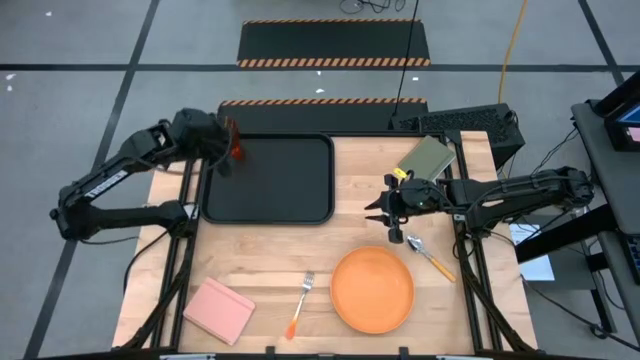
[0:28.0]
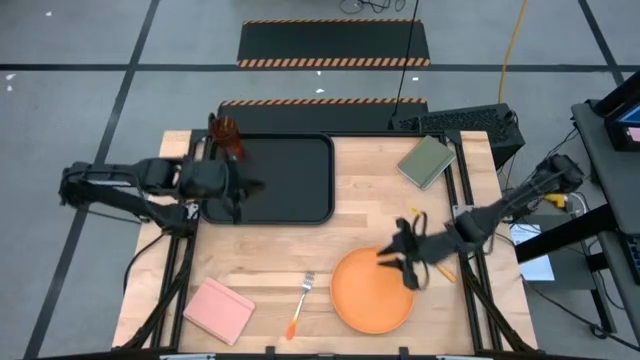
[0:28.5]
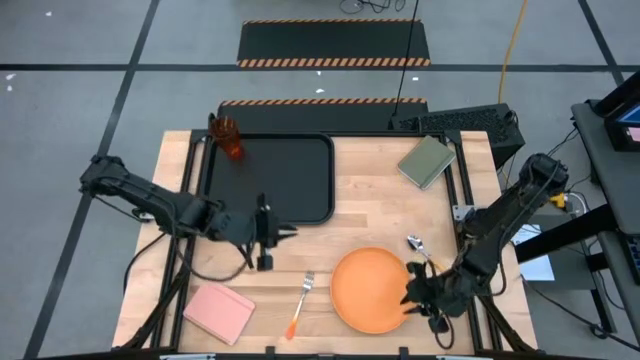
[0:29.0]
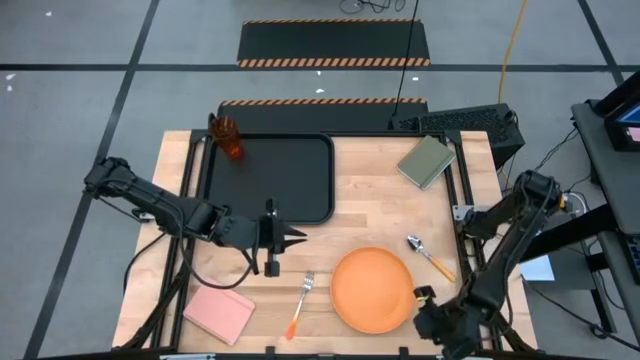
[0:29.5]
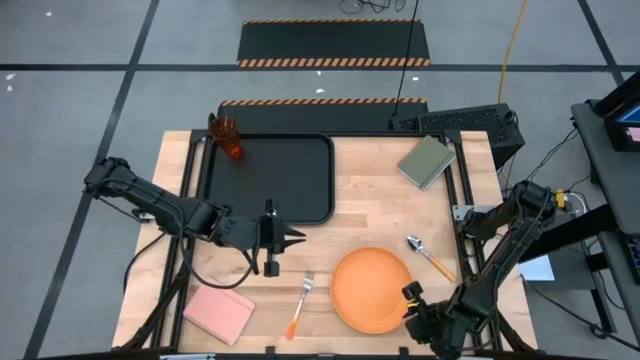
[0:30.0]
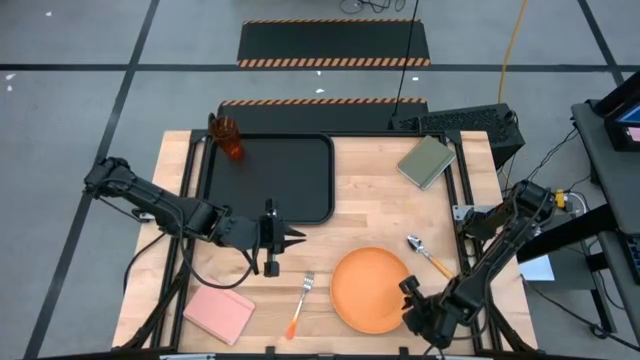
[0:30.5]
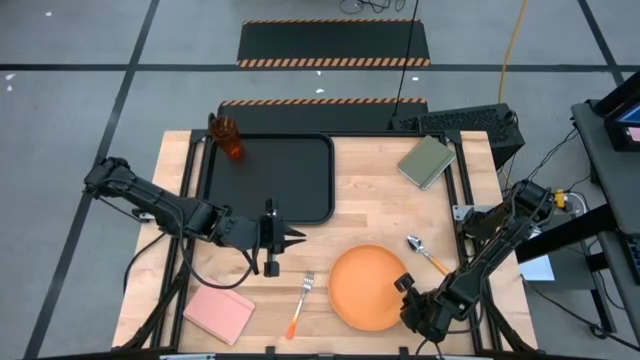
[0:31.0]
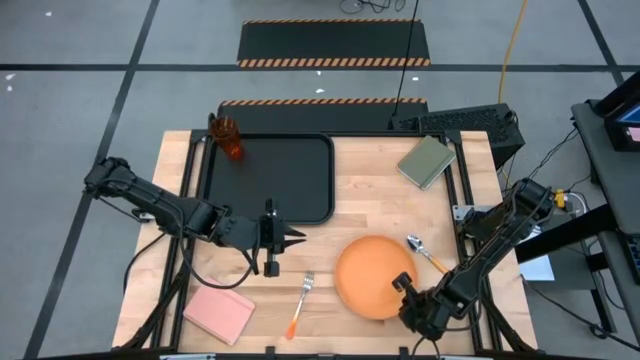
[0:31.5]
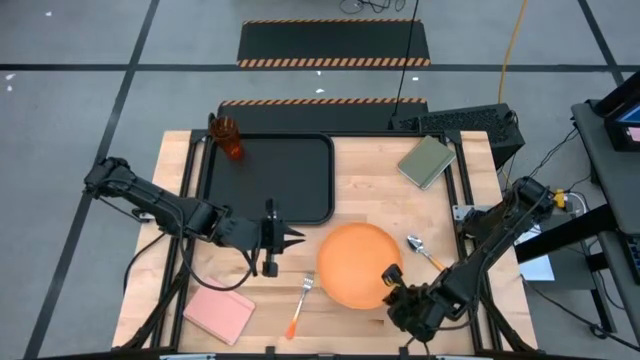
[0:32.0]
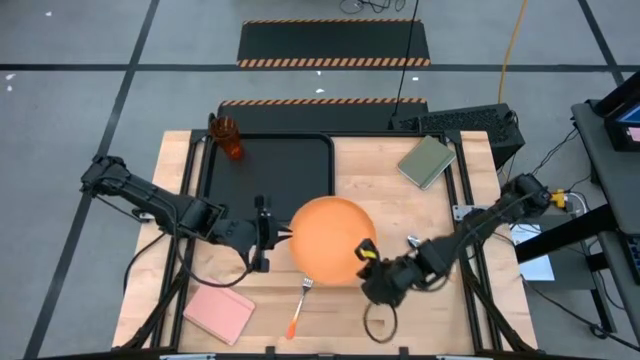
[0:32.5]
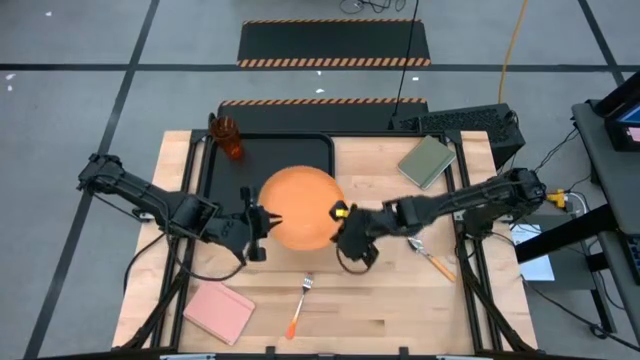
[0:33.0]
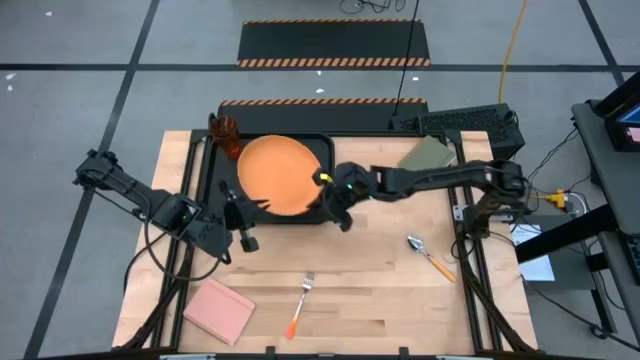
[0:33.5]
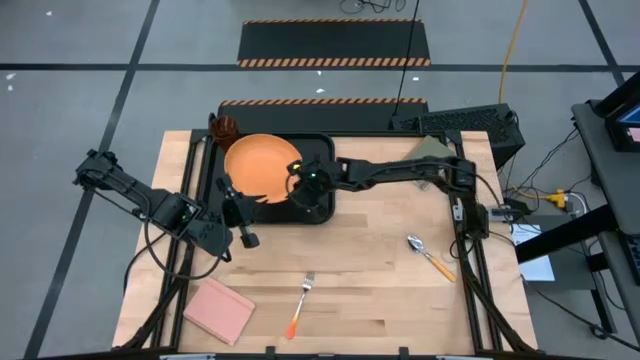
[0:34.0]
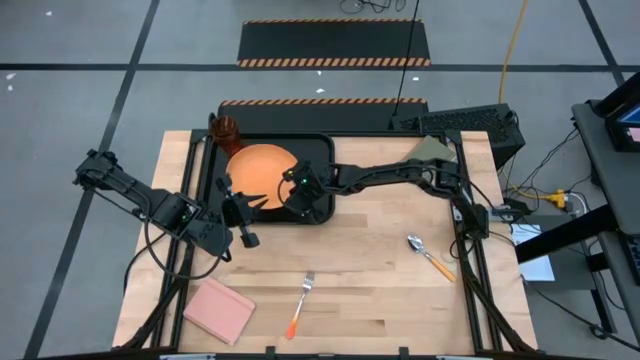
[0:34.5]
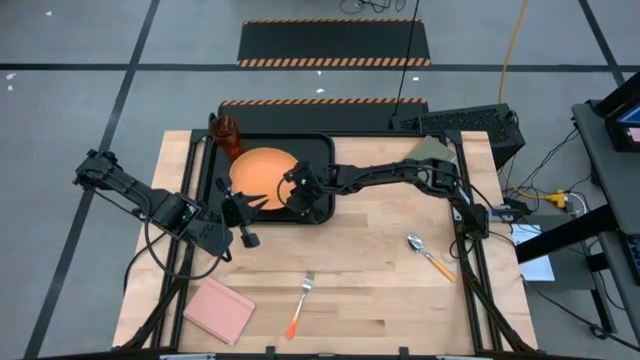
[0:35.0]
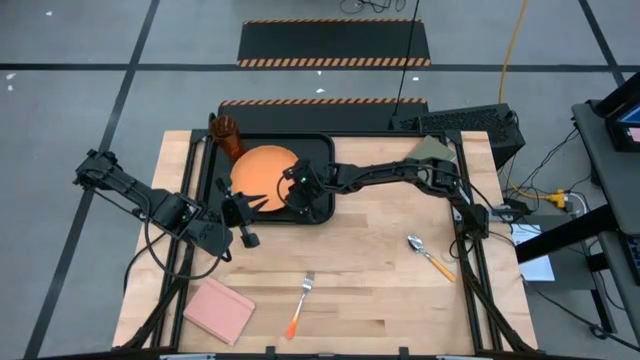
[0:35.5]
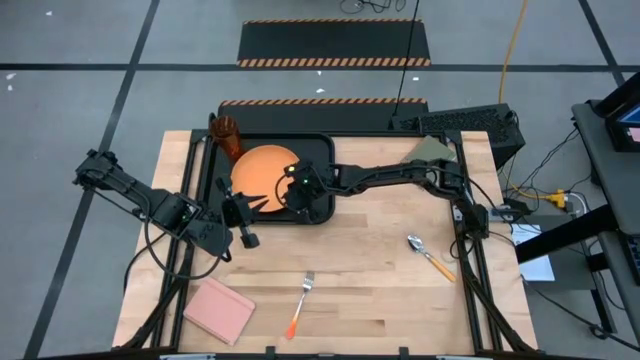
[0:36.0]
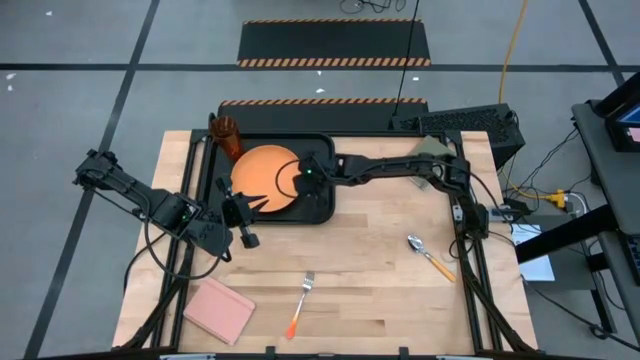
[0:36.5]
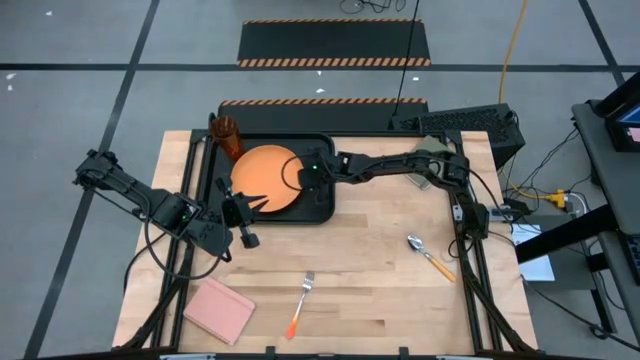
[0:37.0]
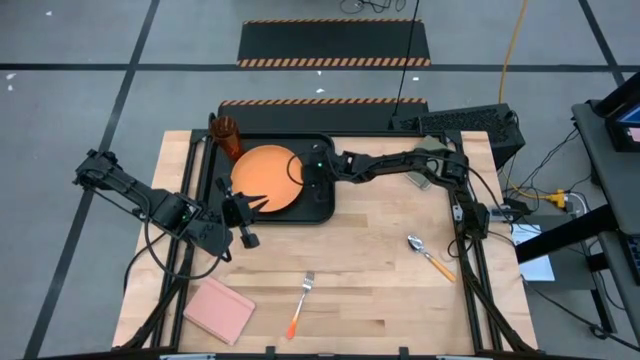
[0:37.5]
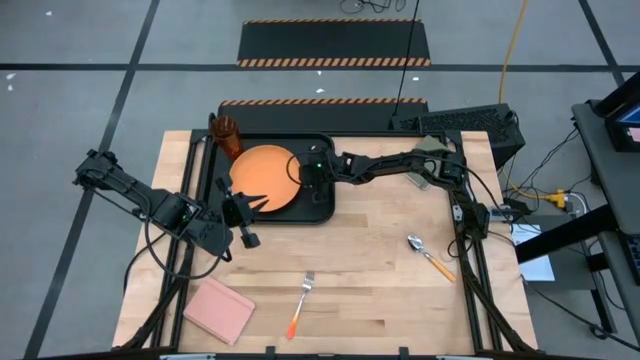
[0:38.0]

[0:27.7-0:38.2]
Task: Pick and place plate/cup/fork/spoon on tray
Put the orange plate on the black tray

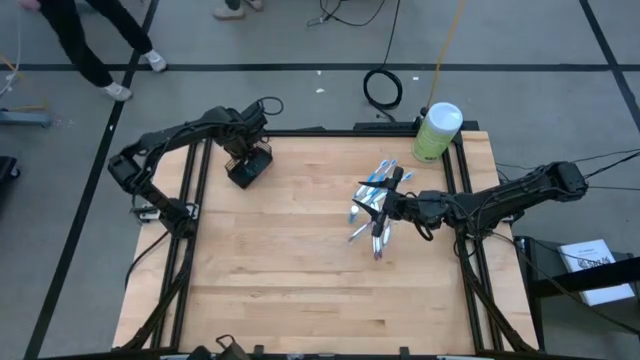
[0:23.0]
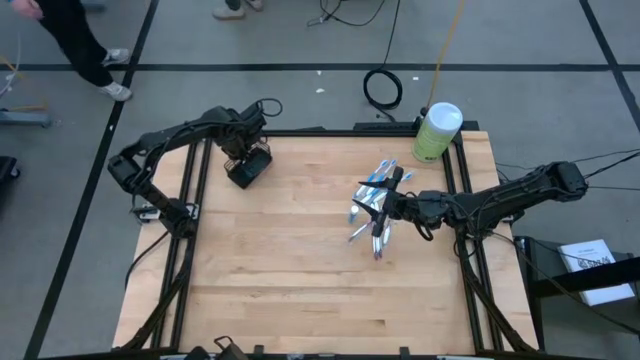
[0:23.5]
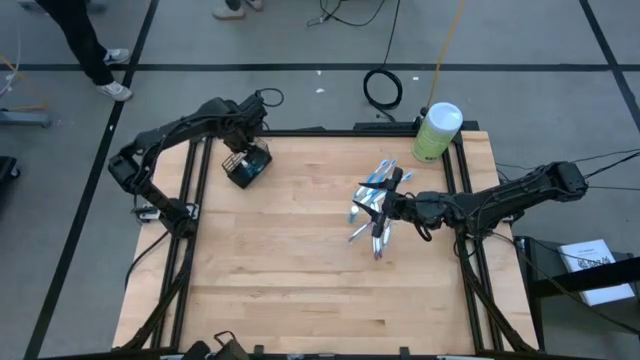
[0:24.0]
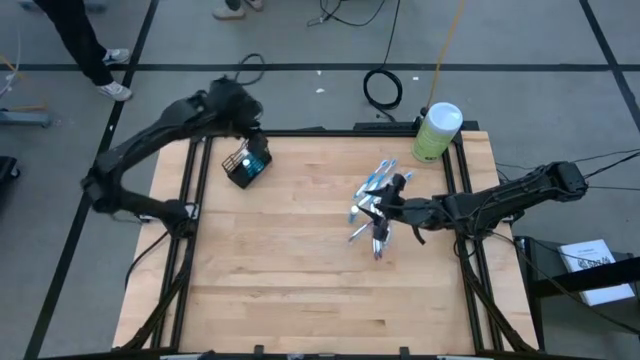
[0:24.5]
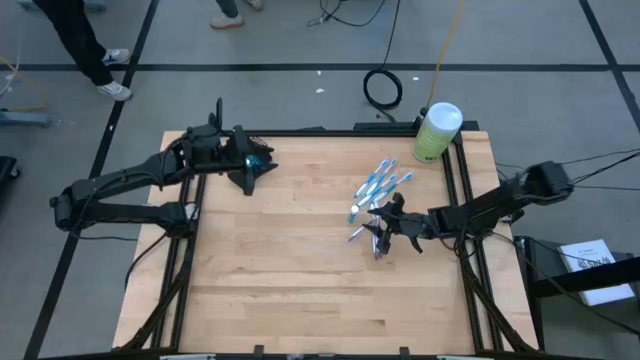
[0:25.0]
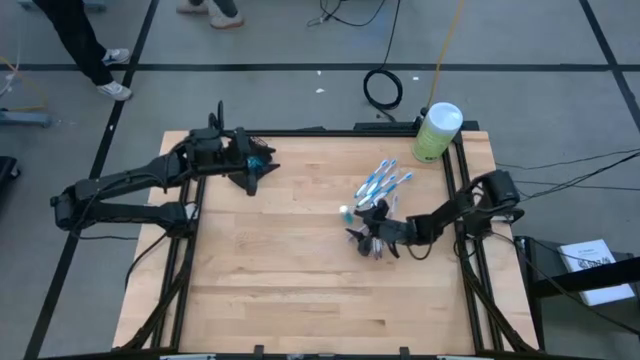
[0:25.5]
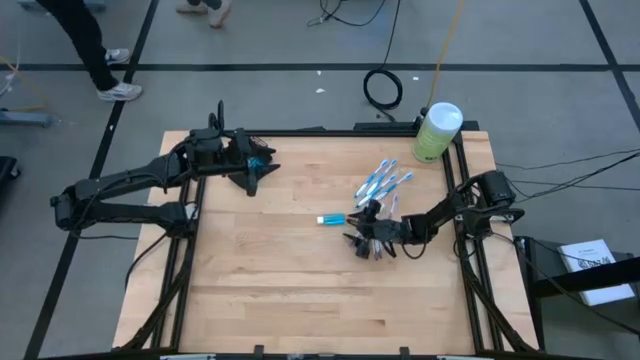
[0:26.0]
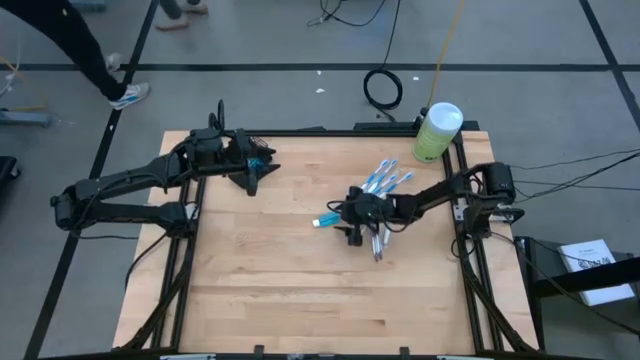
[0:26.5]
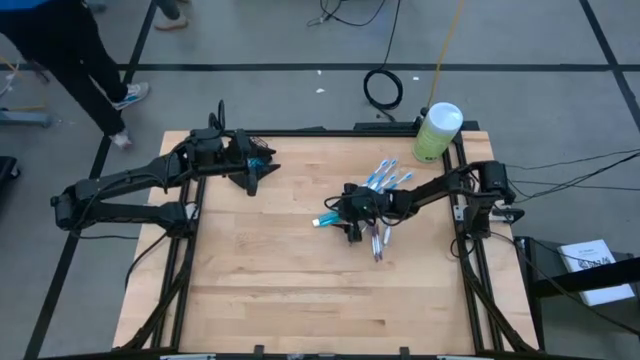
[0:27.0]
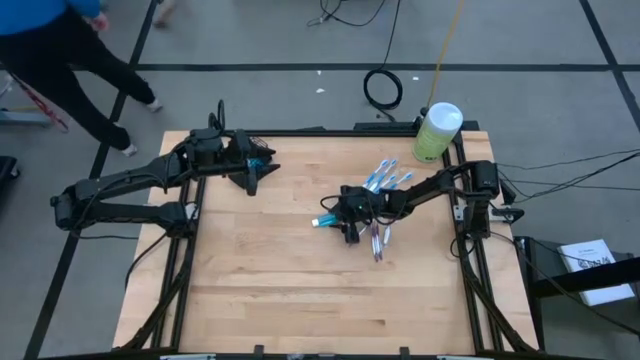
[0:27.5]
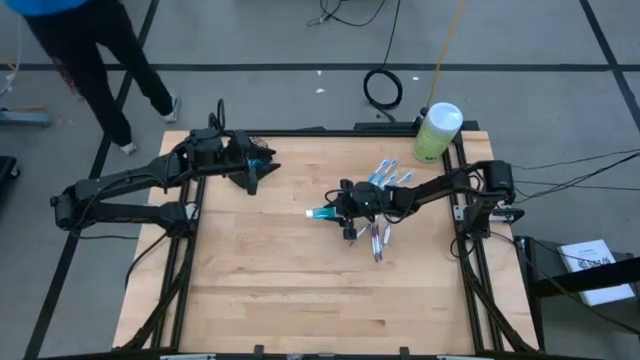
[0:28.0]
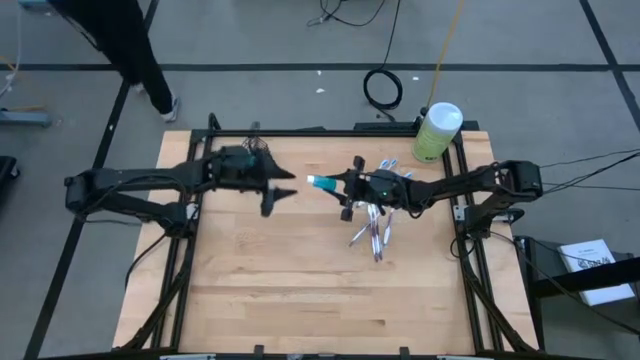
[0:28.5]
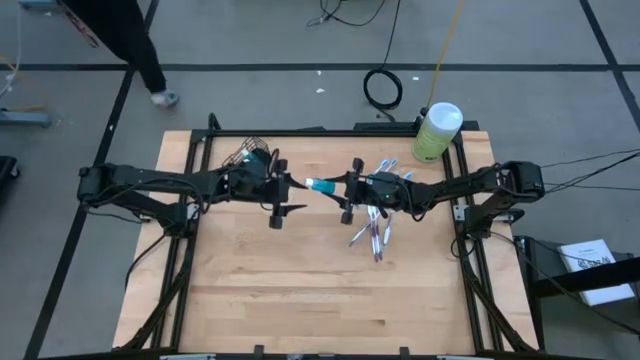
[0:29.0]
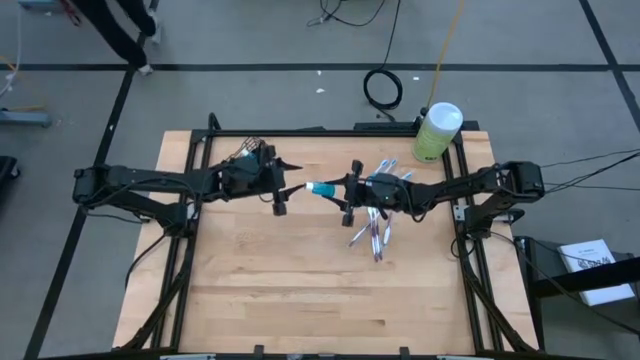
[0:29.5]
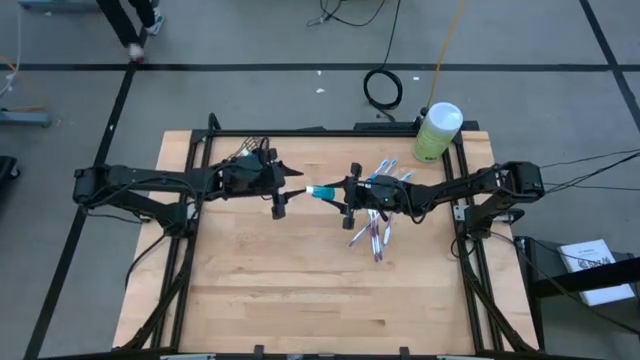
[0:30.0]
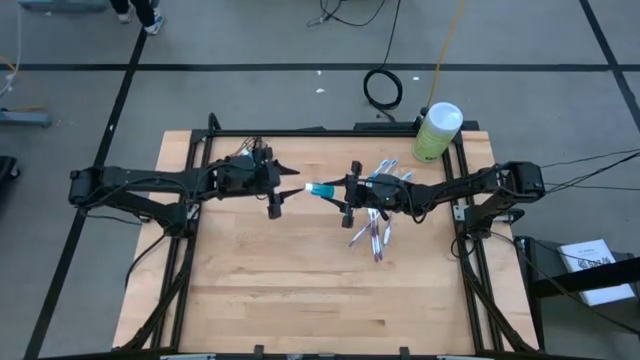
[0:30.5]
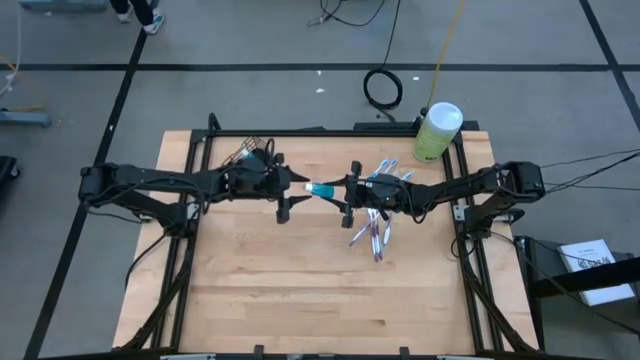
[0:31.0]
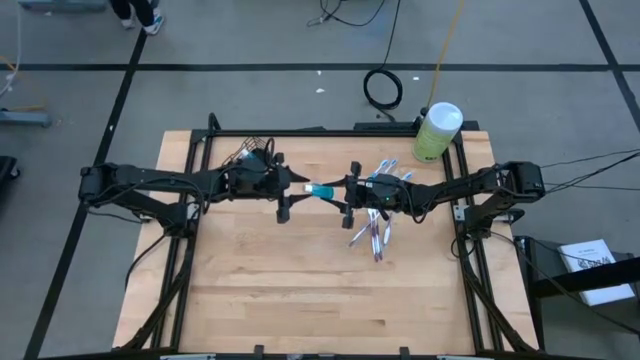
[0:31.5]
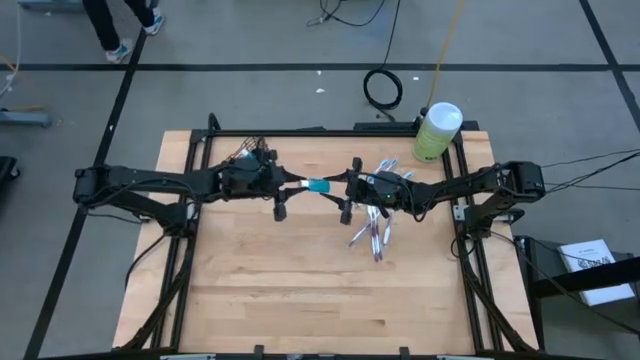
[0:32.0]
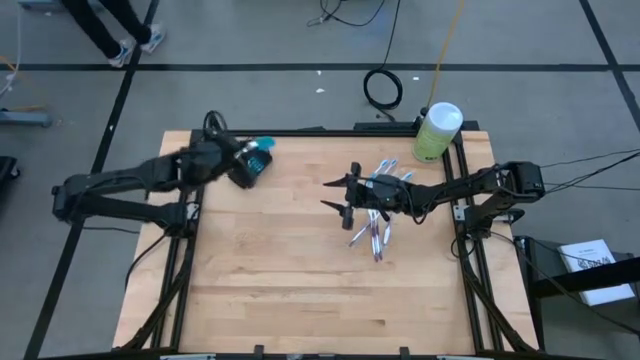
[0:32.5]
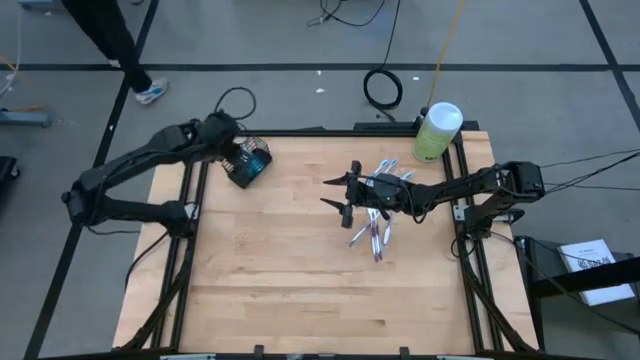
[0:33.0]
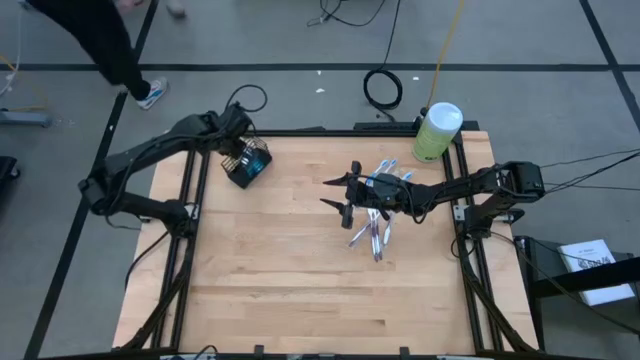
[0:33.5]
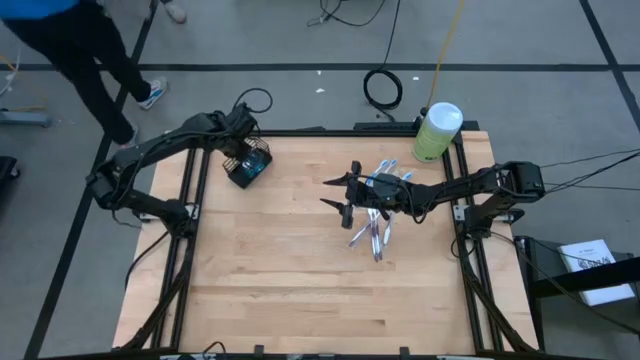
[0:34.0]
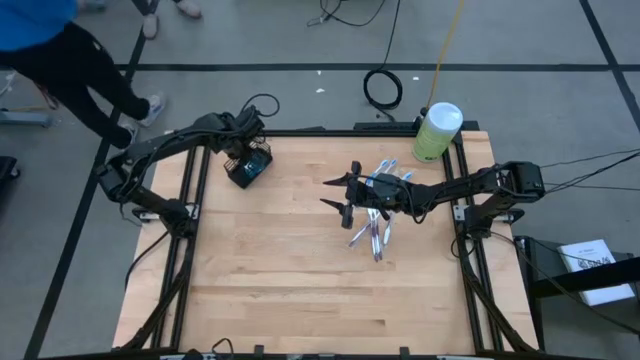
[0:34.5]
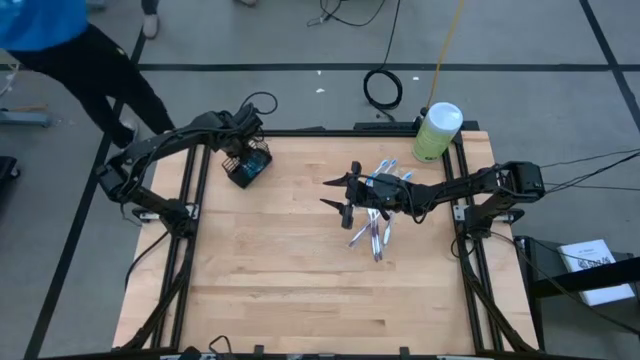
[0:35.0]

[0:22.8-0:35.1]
Task: Pick & Place toothbrushing station
Put the mouthwash into the middle compartment of the wire organizer
